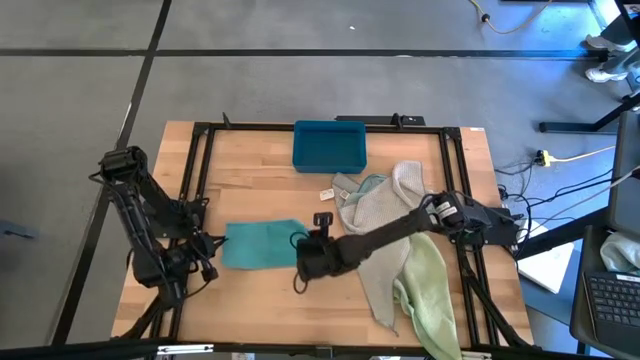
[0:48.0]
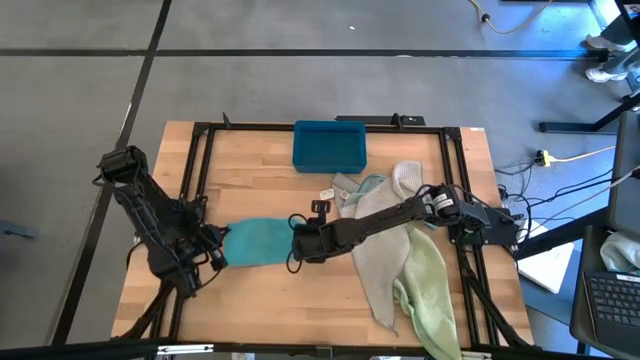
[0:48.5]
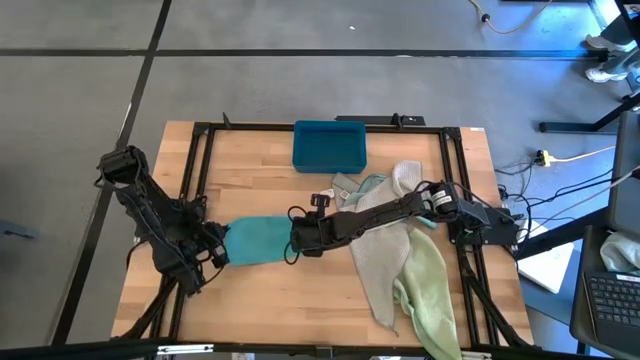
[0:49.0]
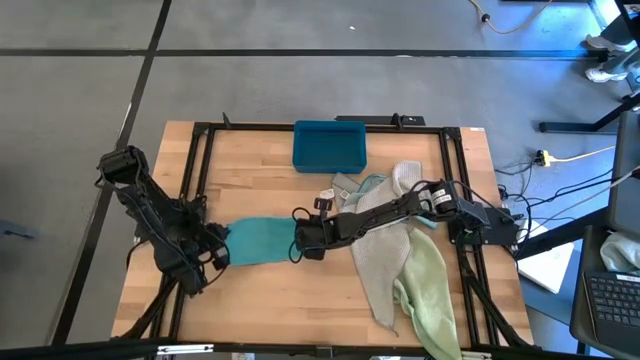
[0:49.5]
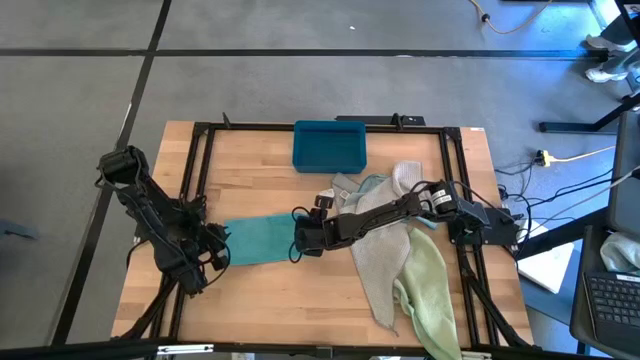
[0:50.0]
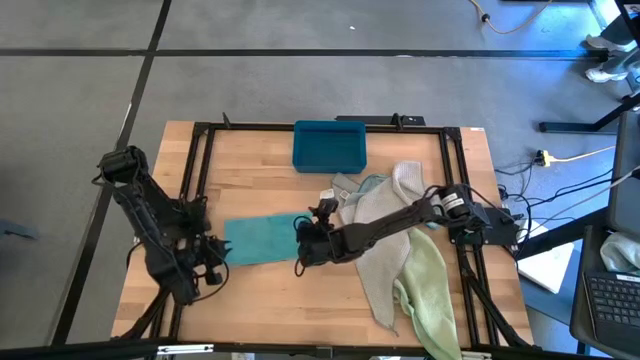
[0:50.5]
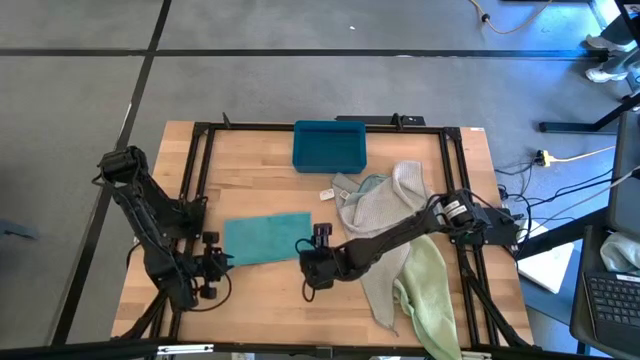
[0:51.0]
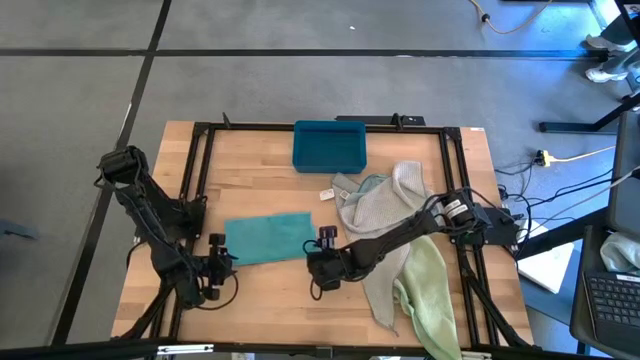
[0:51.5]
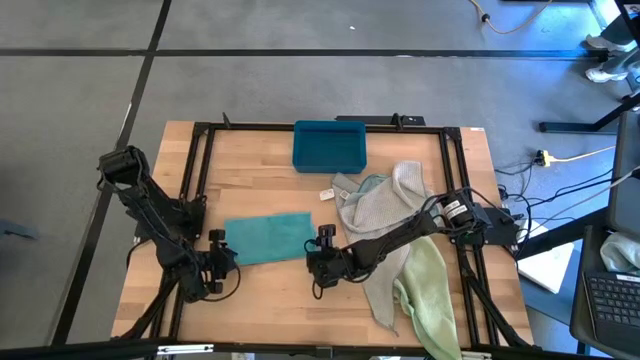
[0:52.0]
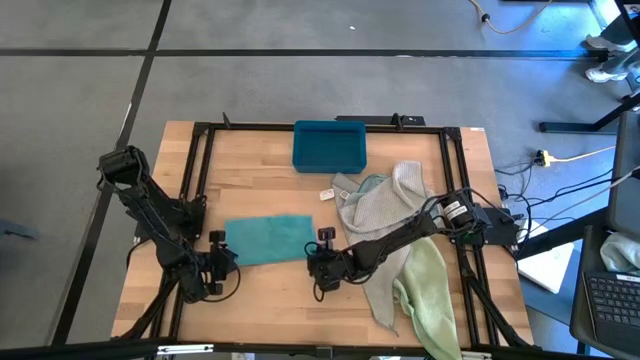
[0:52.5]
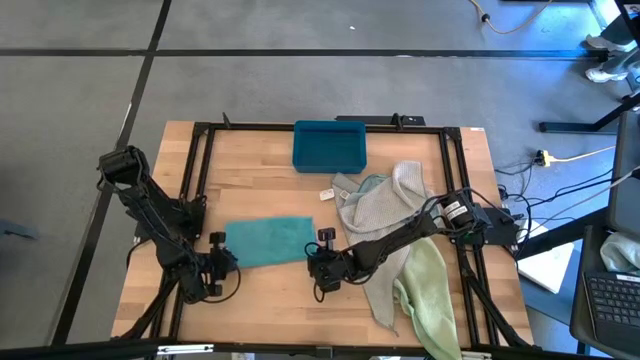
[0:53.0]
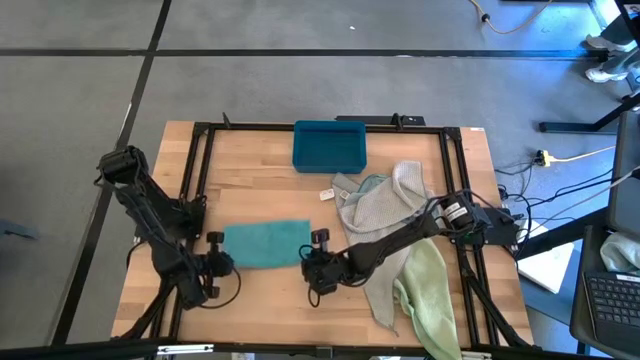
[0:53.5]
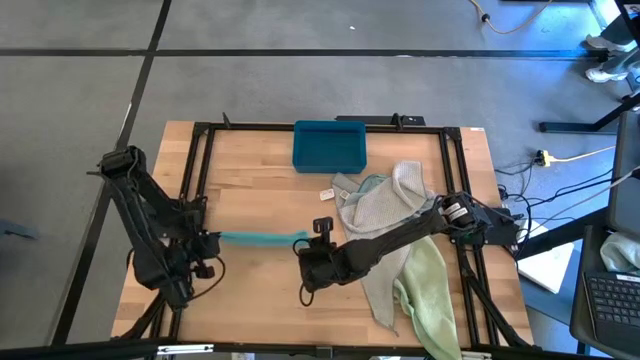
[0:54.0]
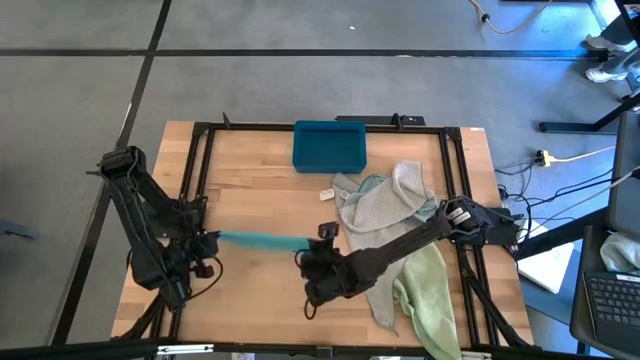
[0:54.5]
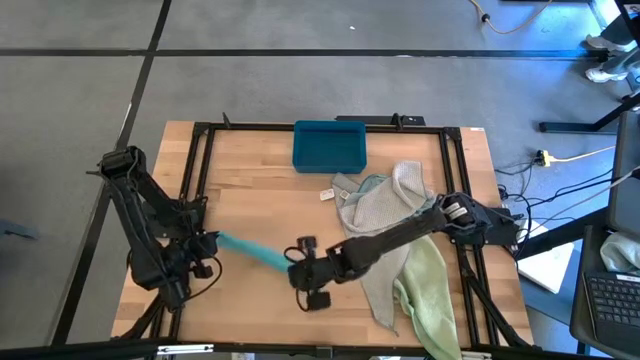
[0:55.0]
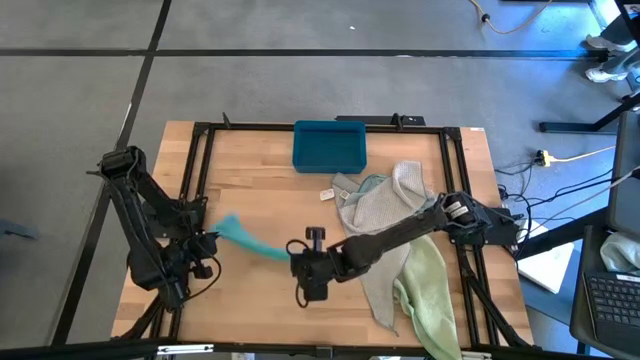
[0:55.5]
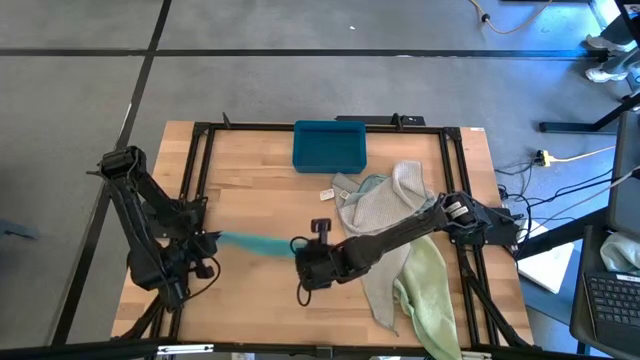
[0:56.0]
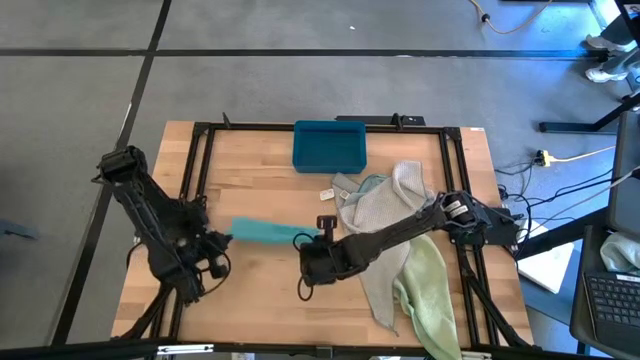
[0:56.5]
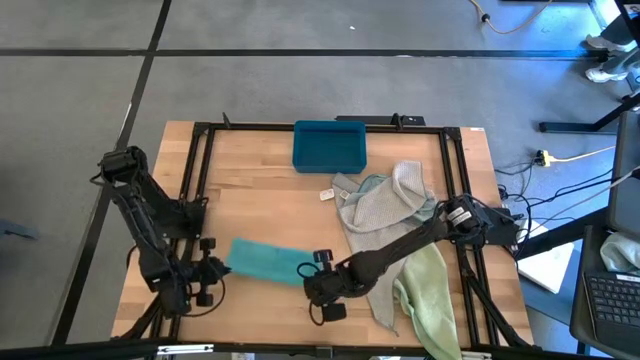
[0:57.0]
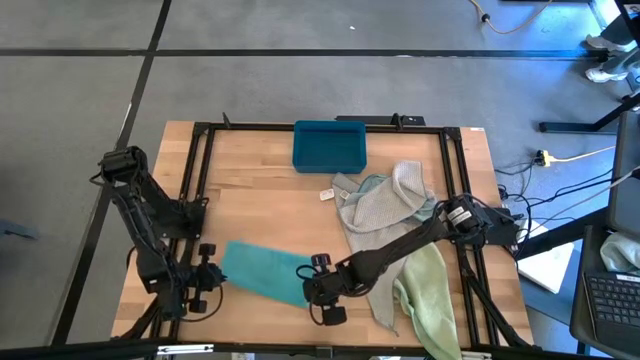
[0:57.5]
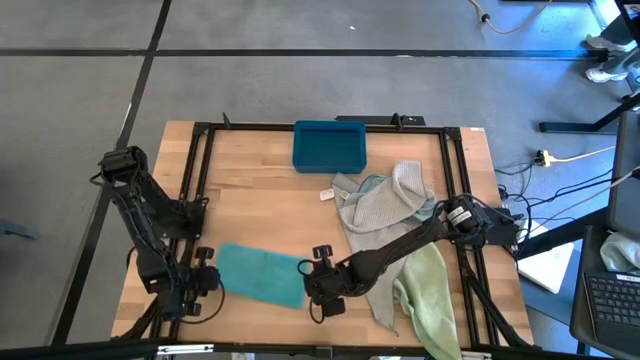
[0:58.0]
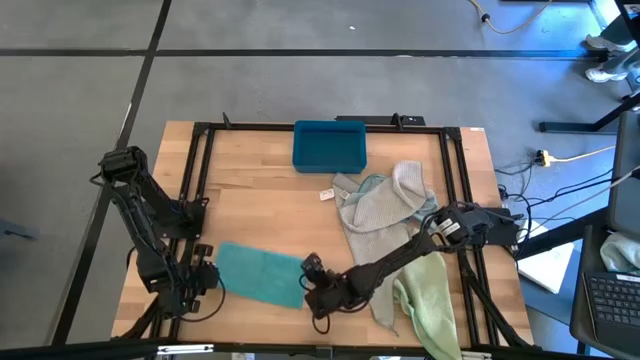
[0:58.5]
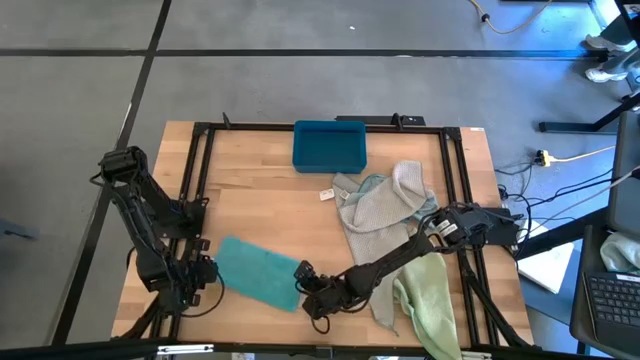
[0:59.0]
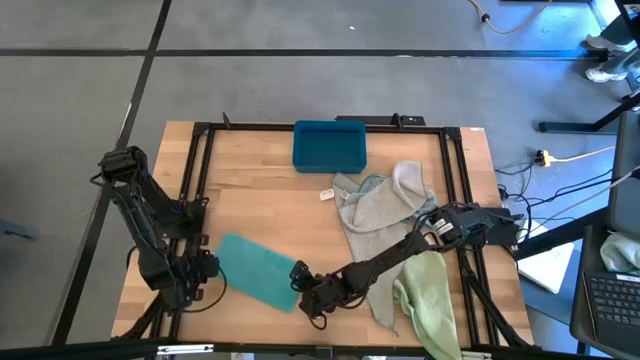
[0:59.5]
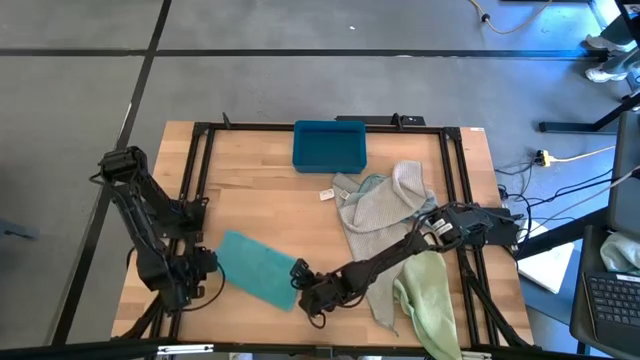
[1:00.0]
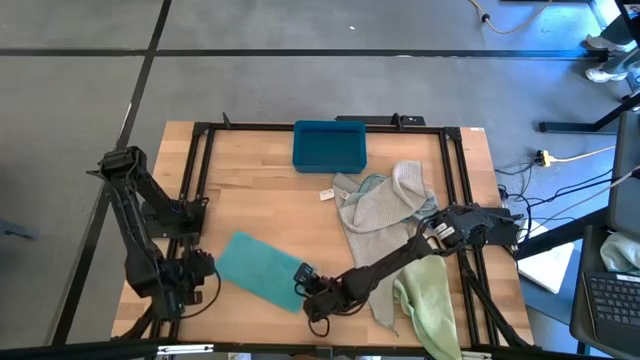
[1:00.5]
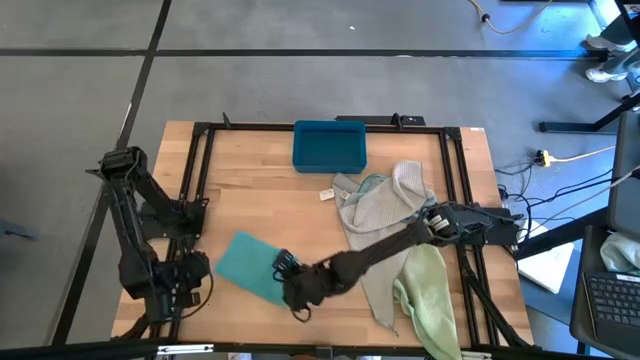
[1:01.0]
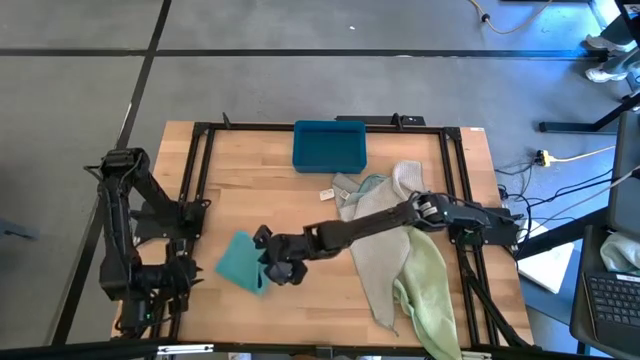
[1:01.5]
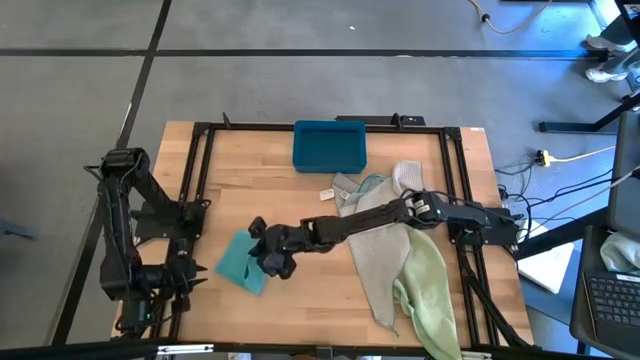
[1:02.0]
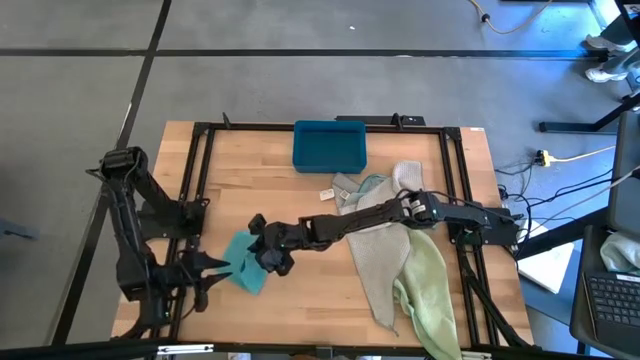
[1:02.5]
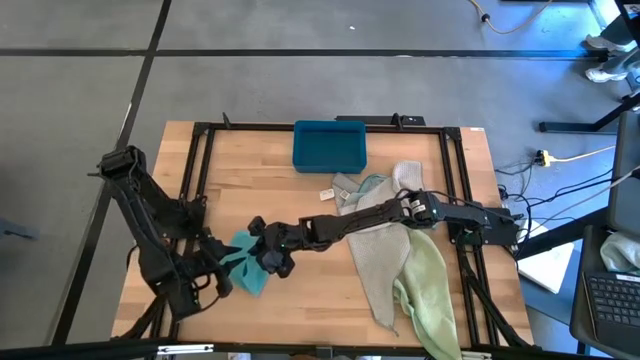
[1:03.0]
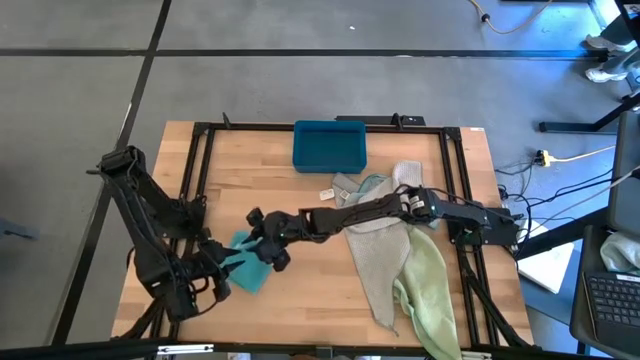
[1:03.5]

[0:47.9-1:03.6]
Task: Fold microfiber towels
Fold the blue towel

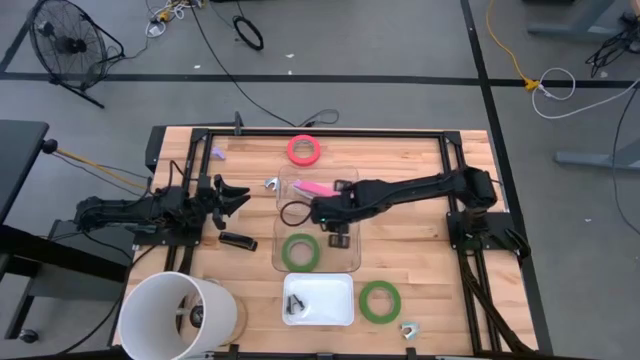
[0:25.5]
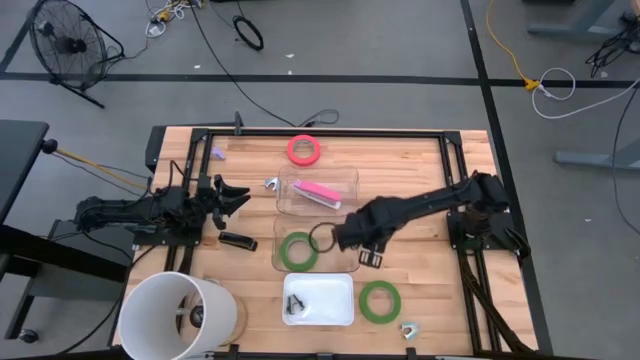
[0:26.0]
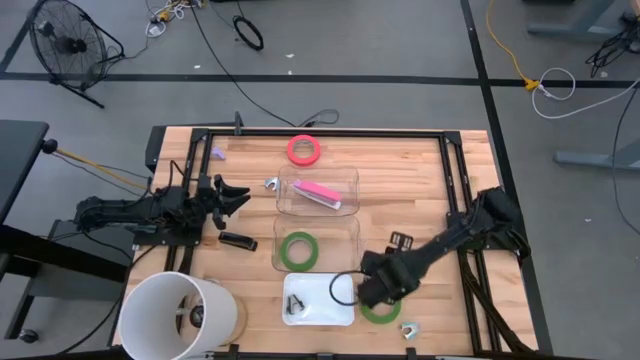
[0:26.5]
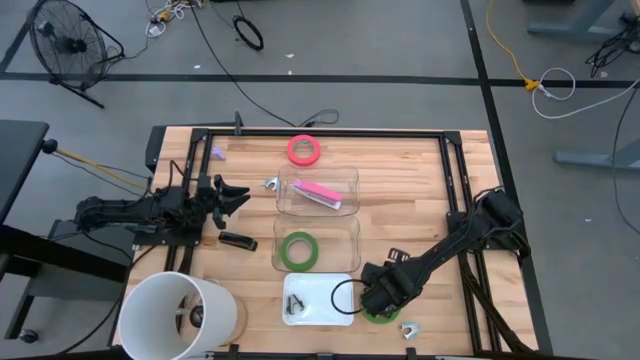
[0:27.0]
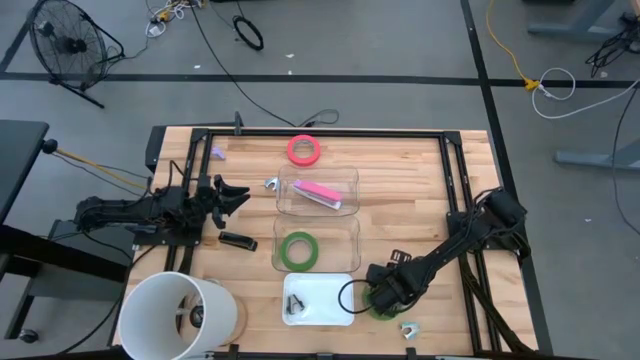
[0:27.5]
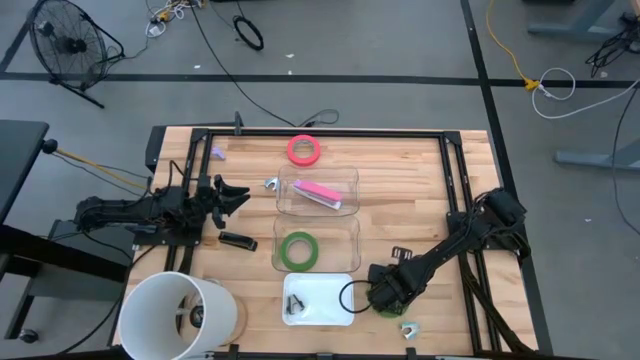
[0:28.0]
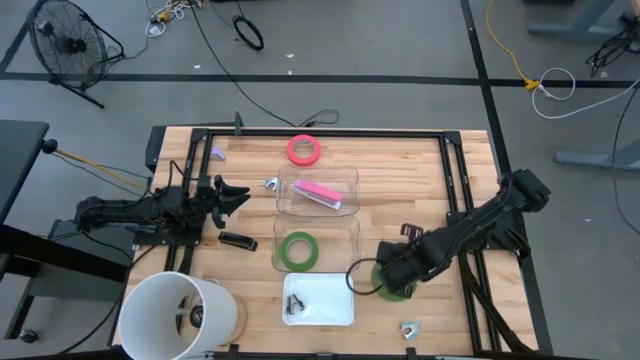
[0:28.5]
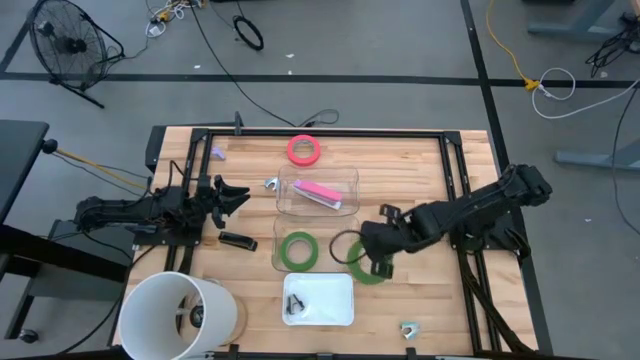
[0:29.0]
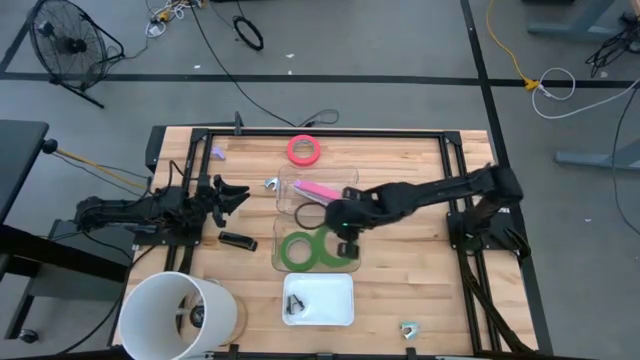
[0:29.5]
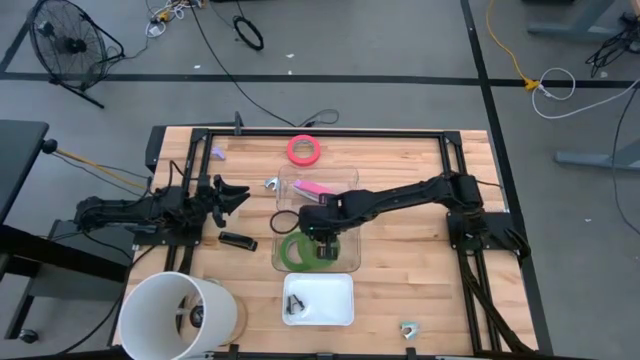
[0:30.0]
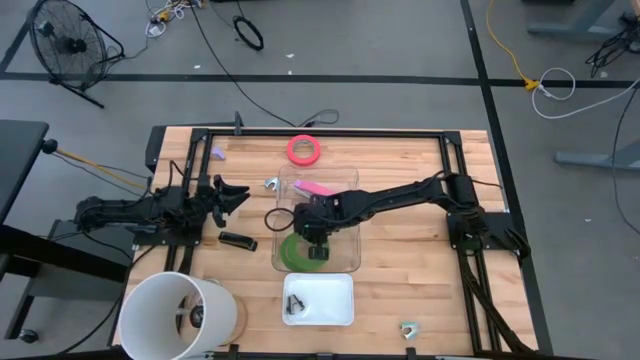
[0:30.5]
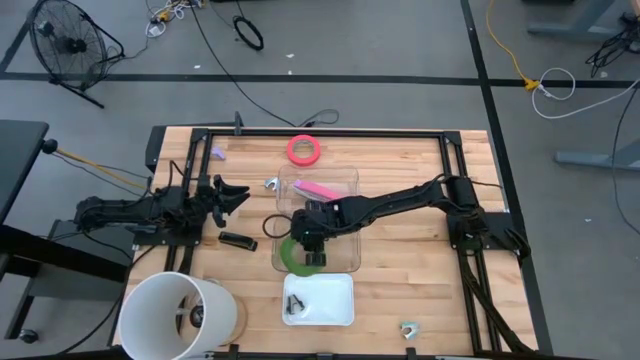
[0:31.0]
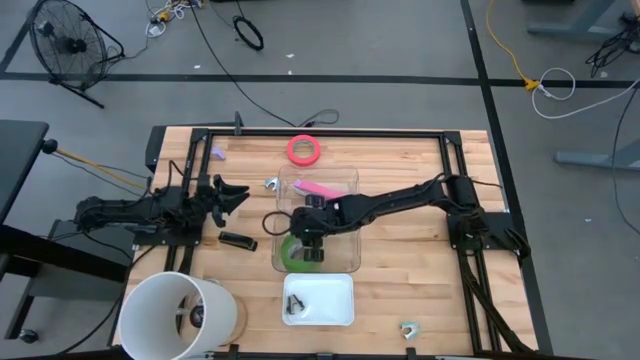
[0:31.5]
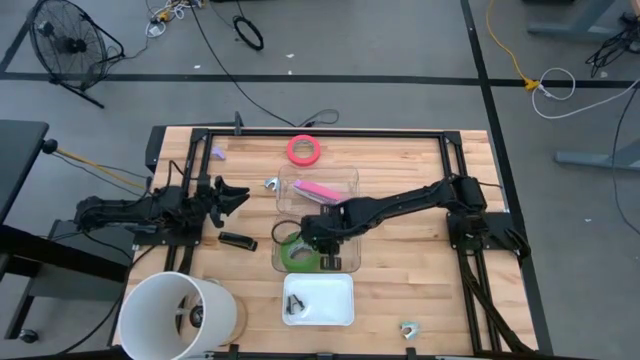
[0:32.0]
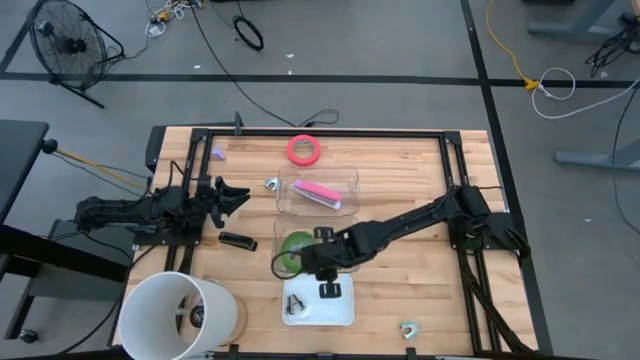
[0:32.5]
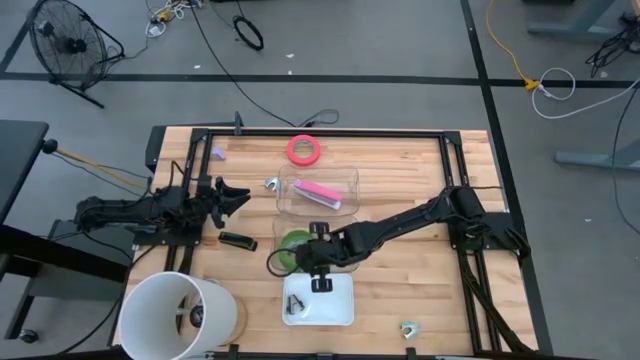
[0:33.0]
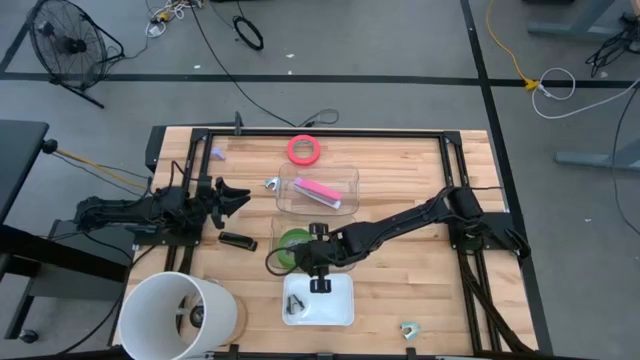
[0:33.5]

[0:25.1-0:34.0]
Task: Pick and place Stapler, Stapler remover, tape
Put the green tape into the bottom transparent bin
